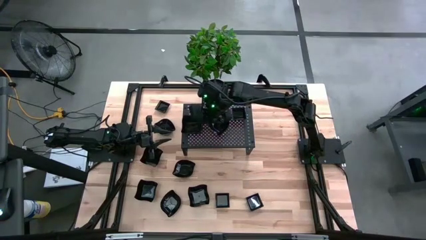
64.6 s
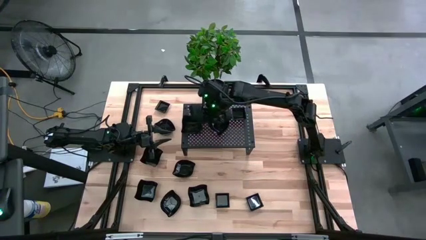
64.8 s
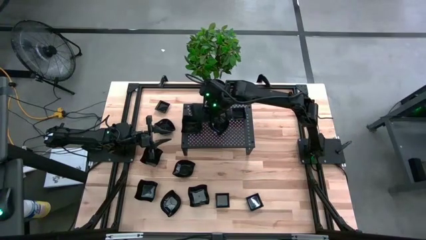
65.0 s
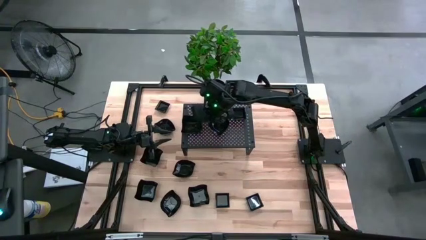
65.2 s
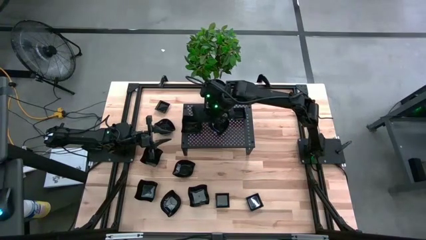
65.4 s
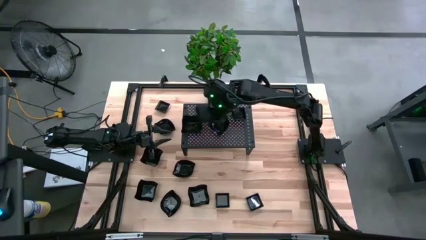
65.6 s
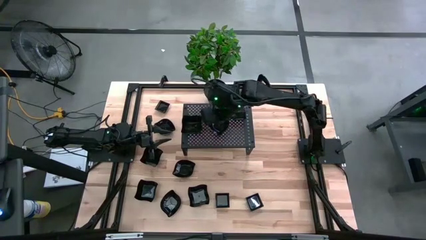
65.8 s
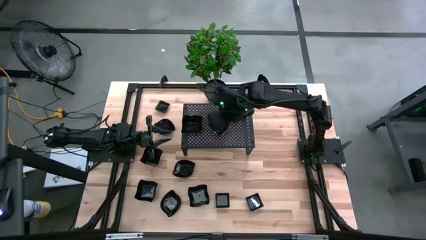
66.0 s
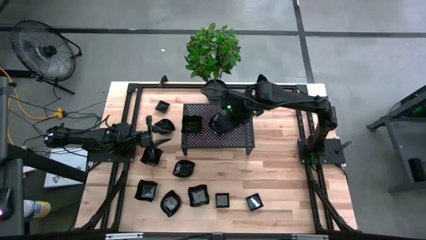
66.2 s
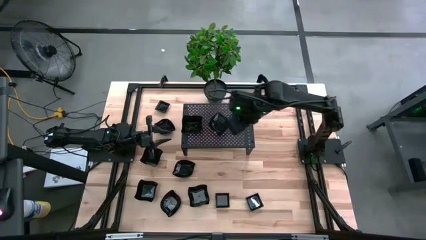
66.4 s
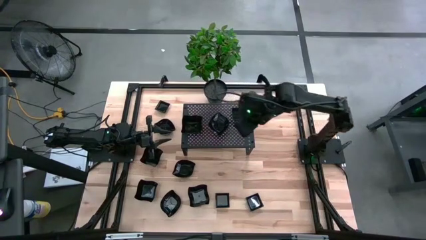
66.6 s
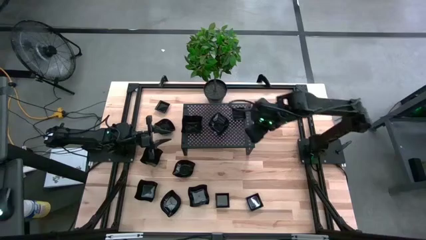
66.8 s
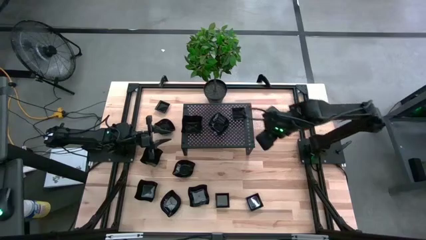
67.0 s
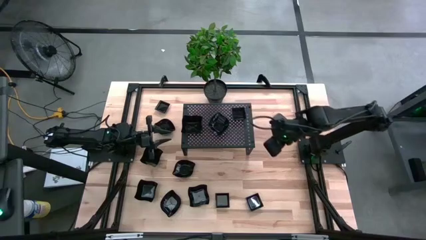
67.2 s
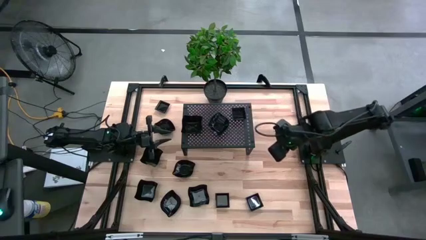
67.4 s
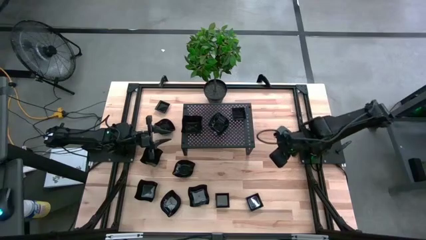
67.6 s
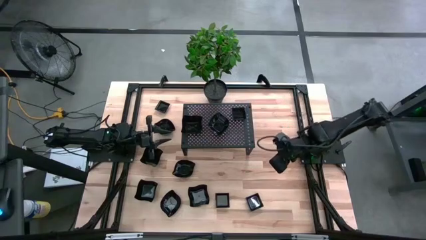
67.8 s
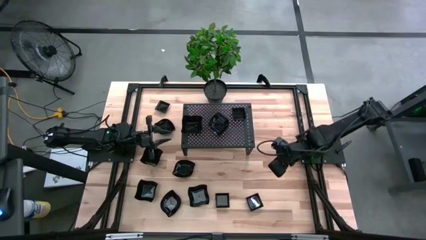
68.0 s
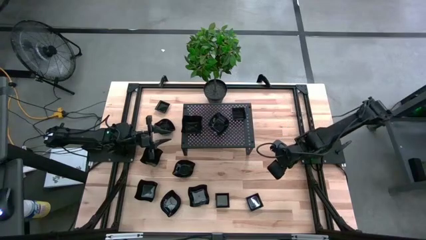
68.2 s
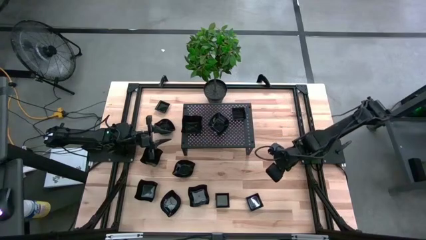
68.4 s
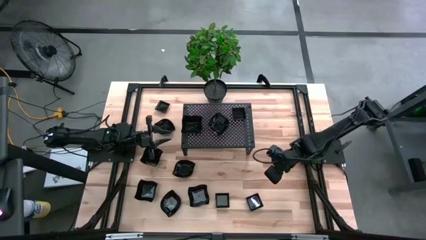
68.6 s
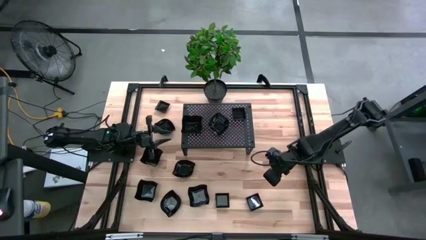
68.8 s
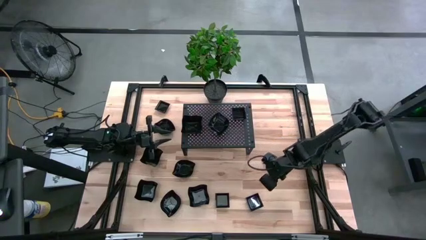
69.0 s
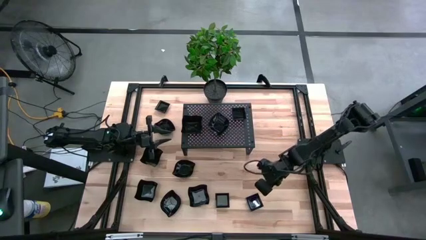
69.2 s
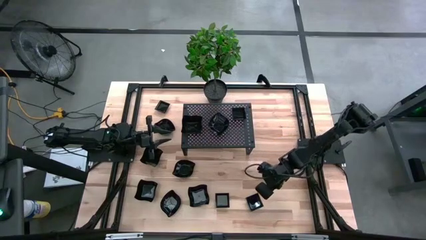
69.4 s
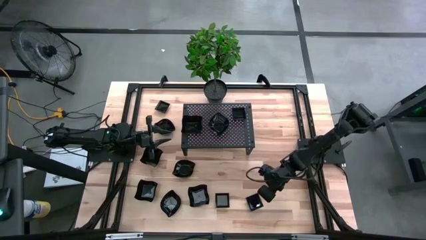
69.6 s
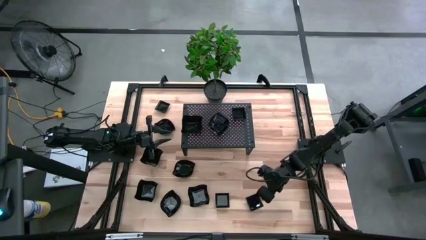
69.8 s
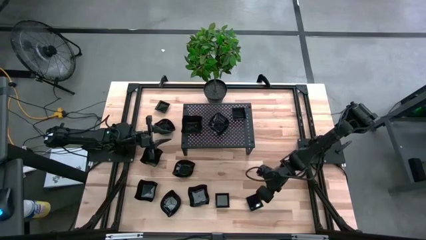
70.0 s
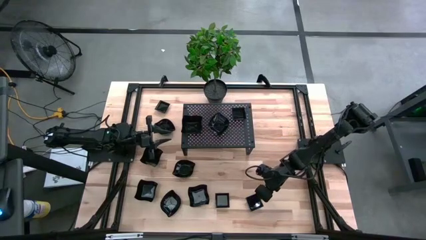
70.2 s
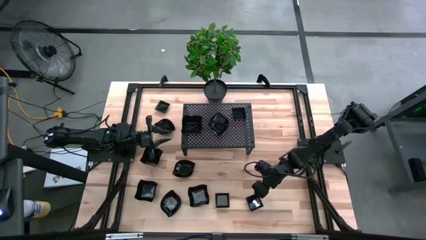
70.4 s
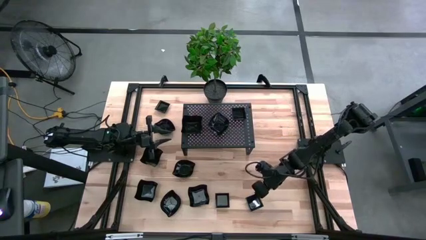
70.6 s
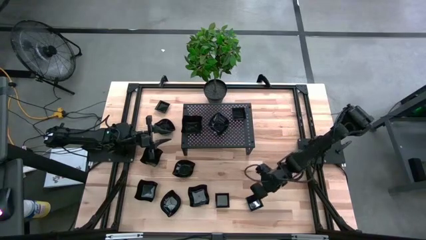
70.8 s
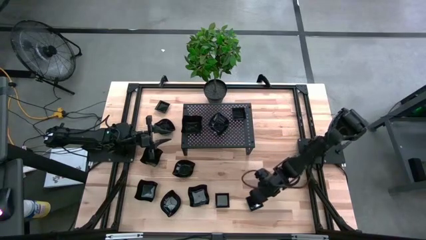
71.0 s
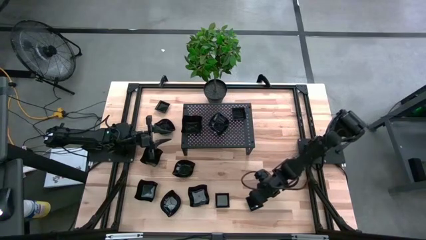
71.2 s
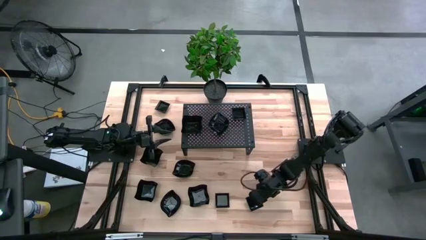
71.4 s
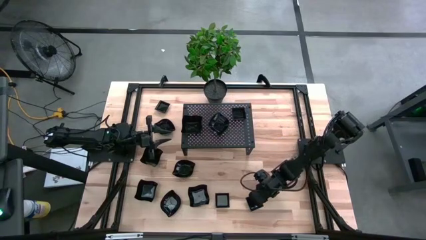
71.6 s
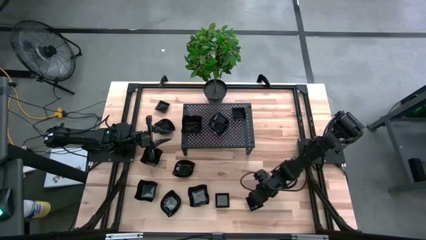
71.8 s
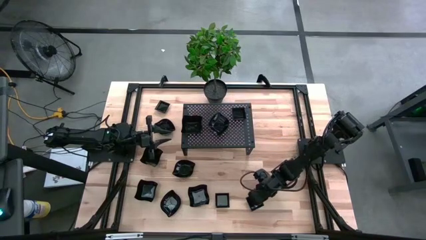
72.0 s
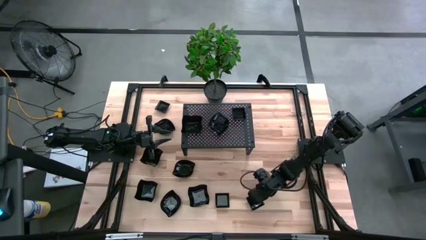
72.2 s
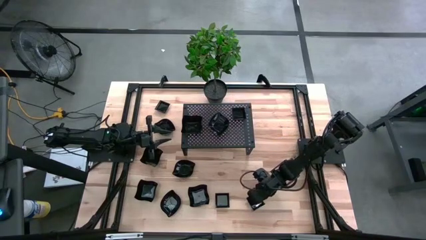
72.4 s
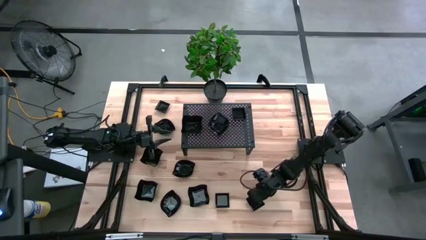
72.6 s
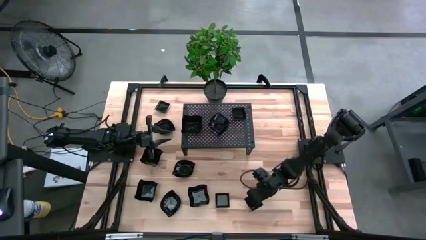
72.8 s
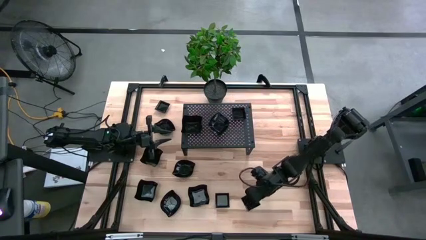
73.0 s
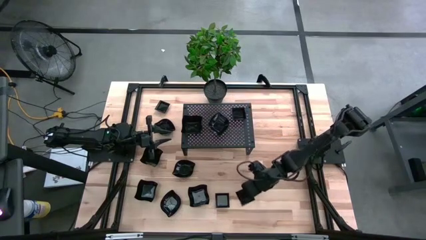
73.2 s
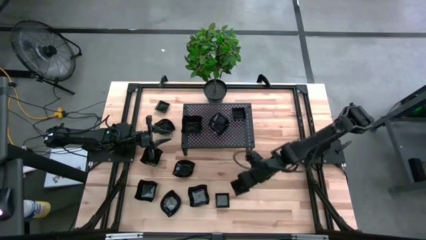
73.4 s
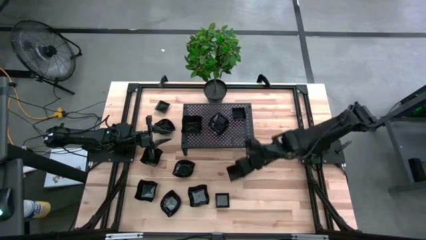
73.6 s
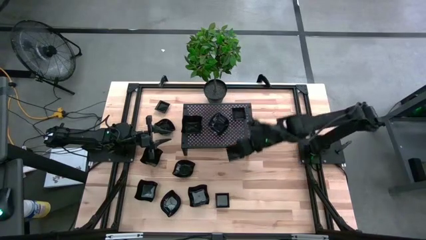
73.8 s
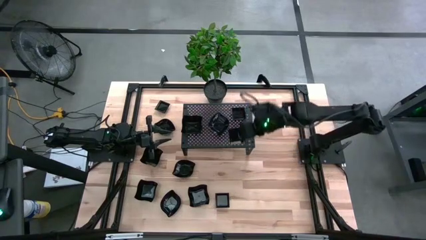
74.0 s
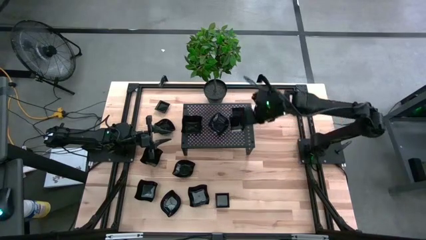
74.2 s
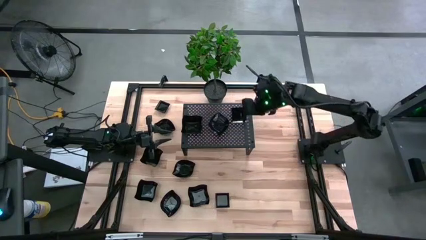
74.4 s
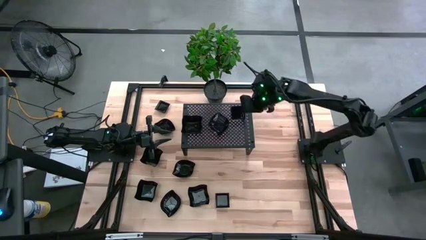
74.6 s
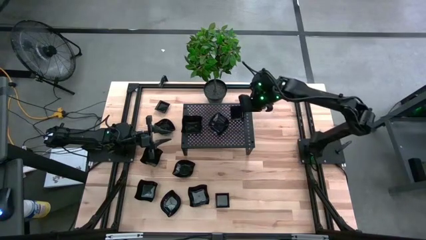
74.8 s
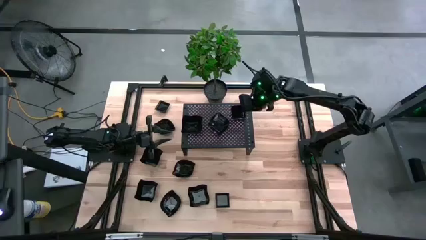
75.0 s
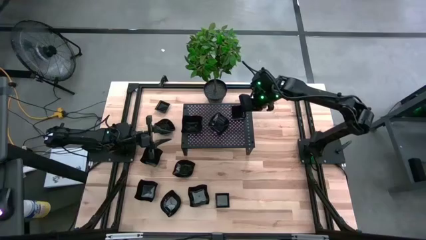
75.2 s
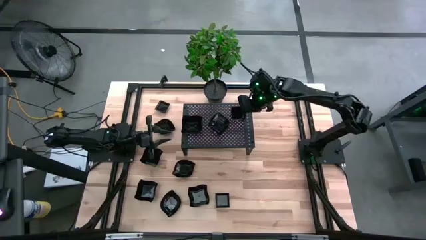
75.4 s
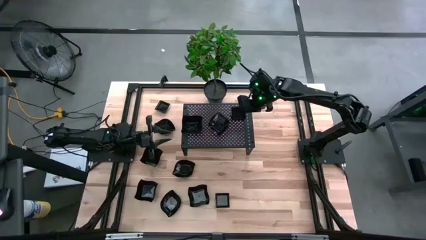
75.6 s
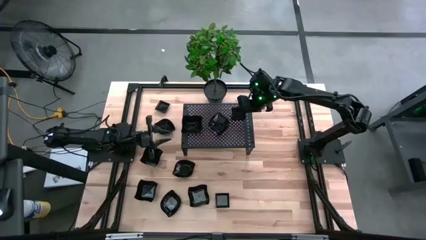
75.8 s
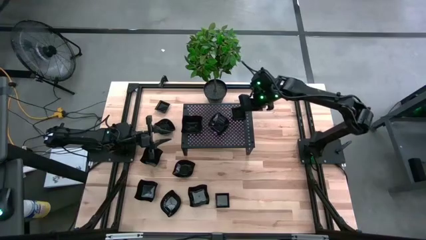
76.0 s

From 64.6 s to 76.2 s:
Task: Pick & Place Mini shaped plates
Stack the black square plate on top of the other black square plates on the shelf
